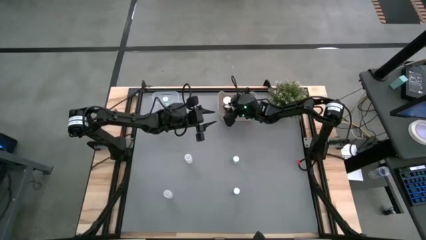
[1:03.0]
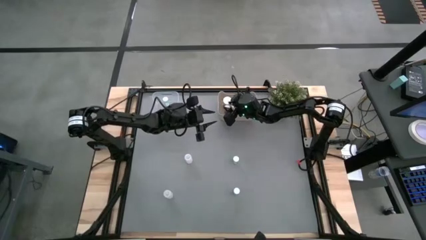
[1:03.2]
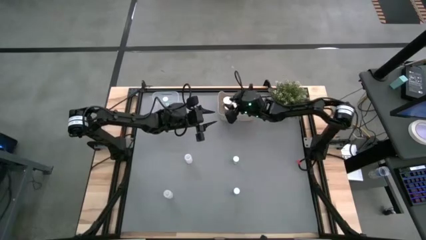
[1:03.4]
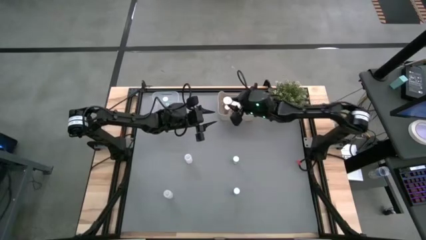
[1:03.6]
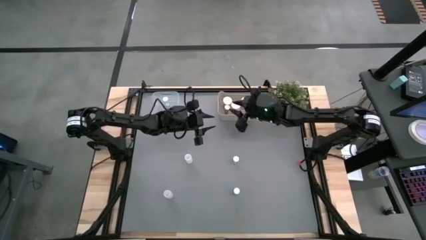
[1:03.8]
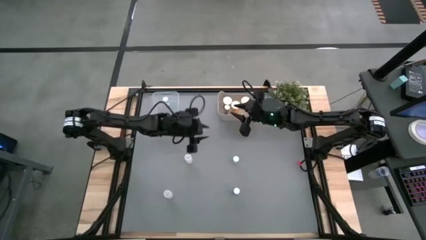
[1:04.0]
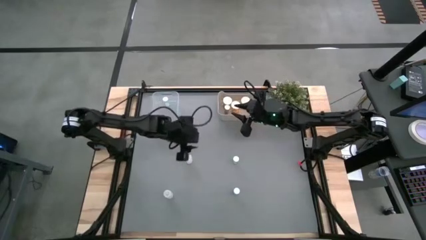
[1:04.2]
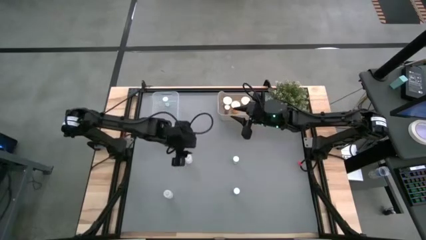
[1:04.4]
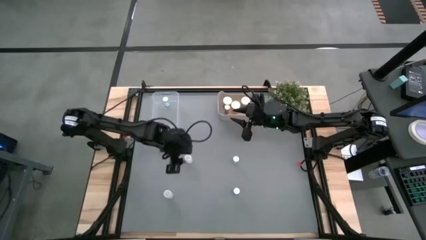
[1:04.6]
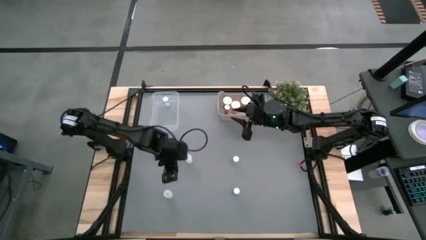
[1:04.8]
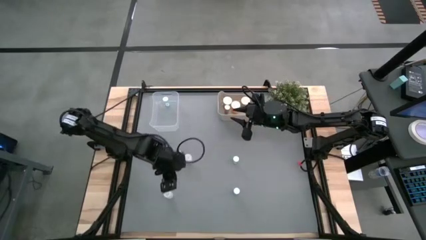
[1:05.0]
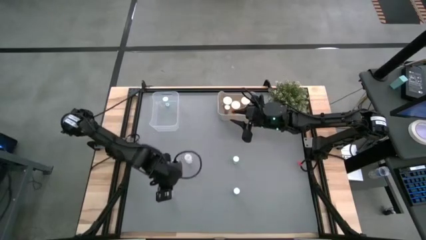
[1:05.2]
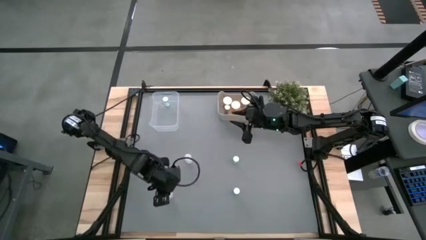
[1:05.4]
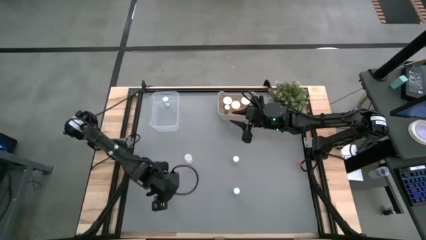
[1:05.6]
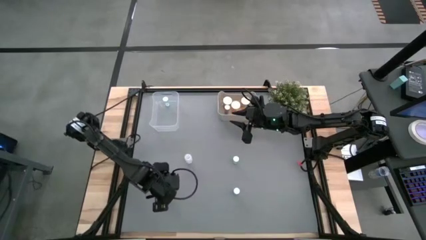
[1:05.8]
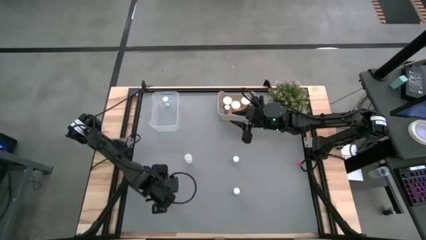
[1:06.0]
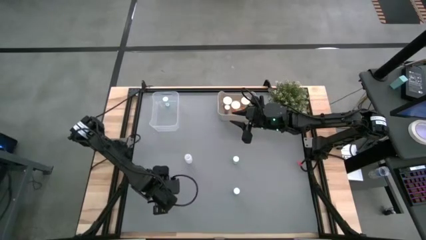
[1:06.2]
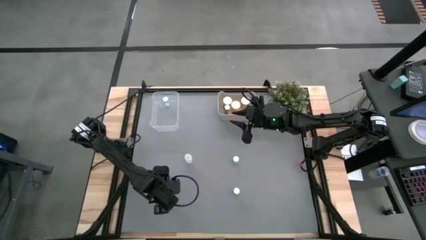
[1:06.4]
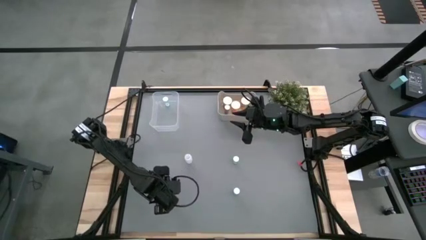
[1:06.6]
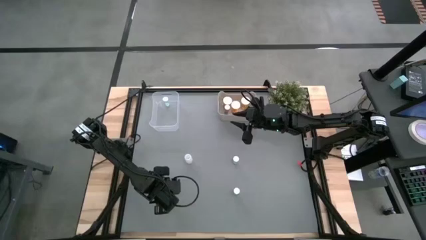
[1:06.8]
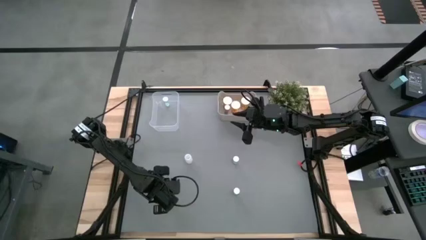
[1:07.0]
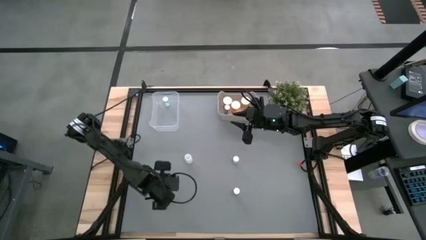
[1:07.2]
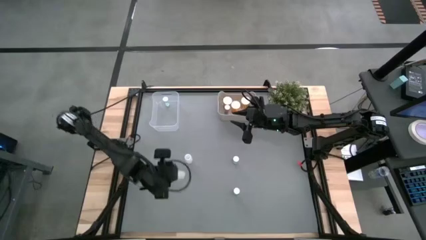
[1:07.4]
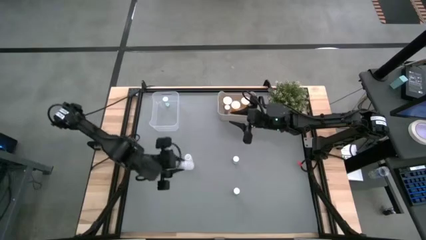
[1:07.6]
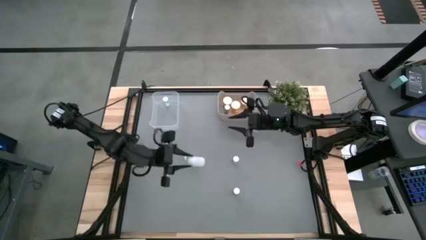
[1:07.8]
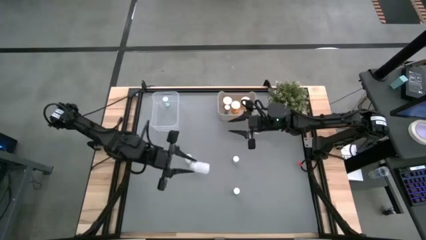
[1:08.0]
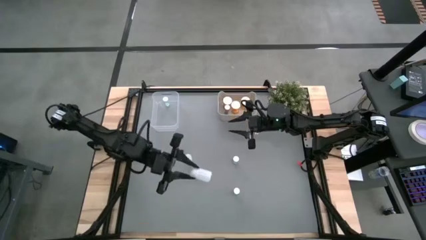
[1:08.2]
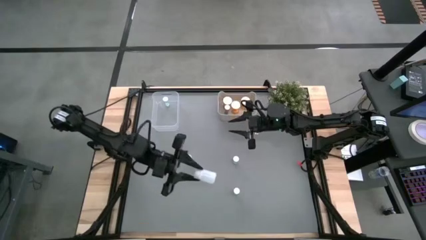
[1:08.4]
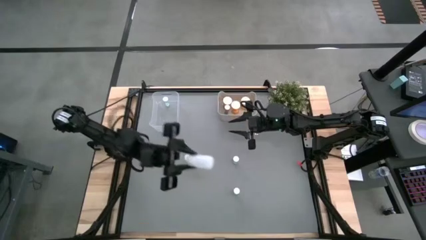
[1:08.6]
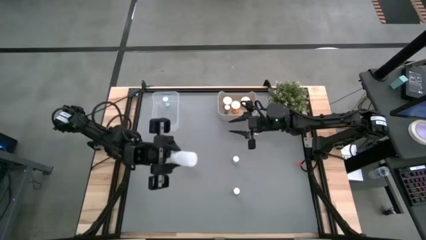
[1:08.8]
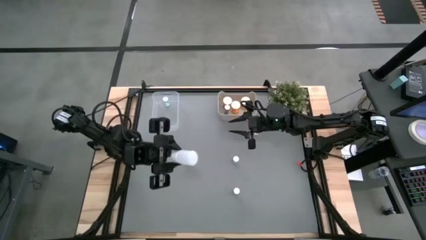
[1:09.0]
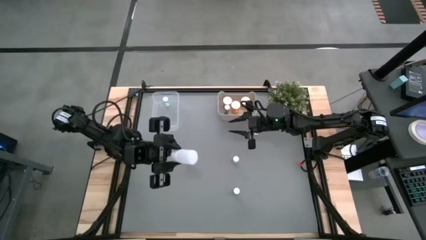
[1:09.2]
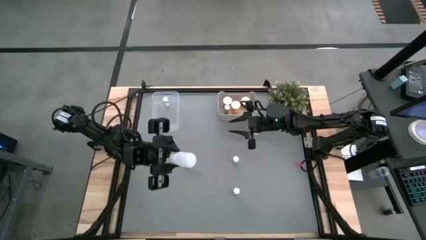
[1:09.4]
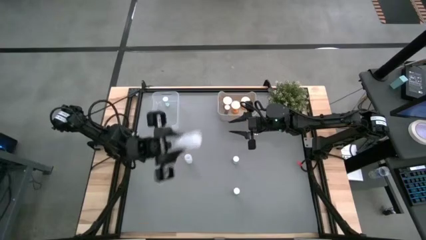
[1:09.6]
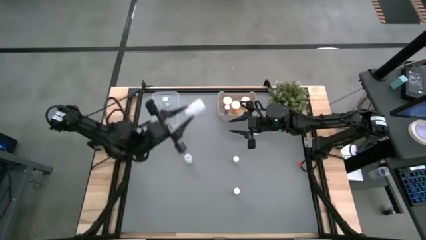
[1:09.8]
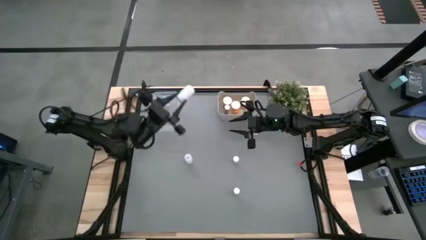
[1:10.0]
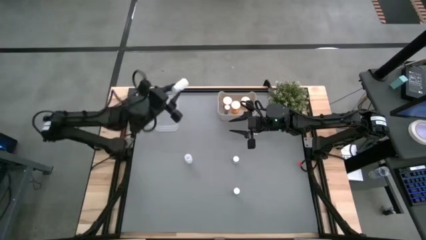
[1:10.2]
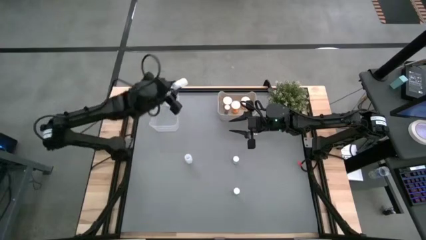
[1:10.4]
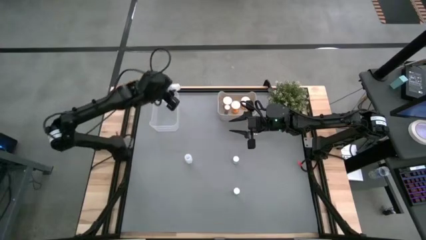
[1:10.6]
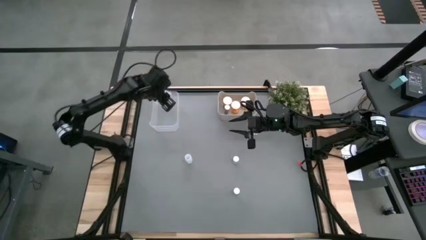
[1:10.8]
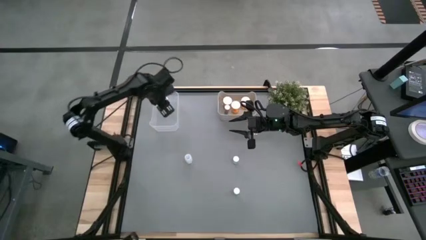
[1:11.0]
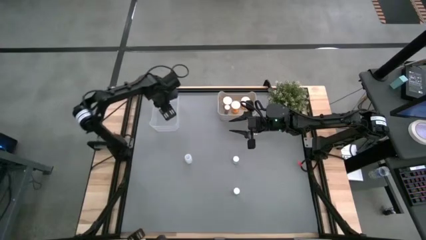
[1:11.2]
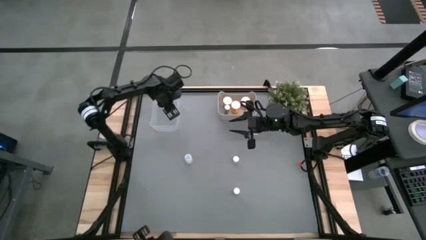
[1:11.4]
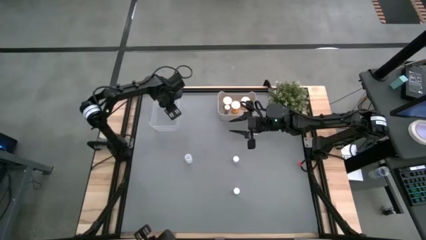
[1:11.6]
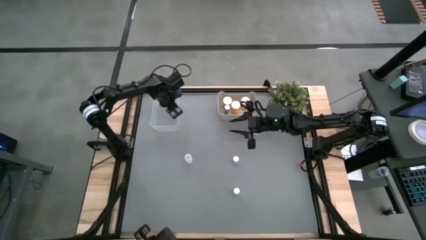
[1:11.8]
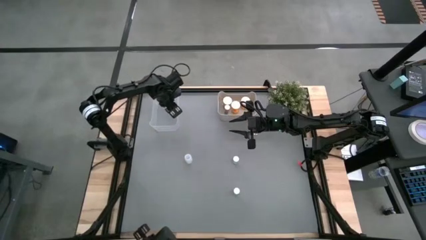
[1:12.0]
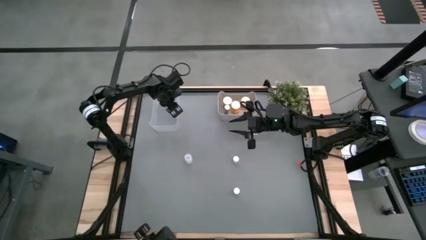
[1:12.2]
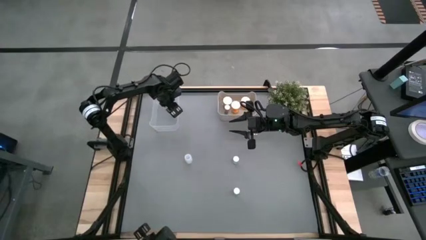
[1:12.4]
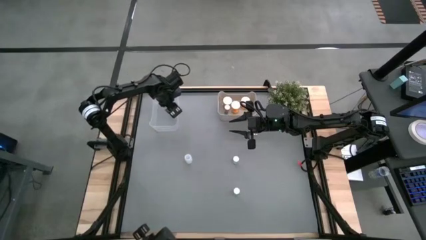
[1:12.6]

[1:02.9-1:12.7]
Task: Pick and place medicine bottles into bin by pill shape (circle, oval)
Put the bottom white tablet bottle into the transparent bin

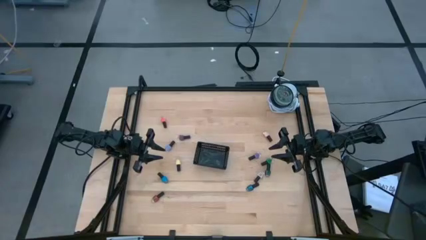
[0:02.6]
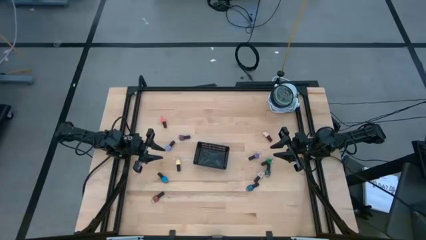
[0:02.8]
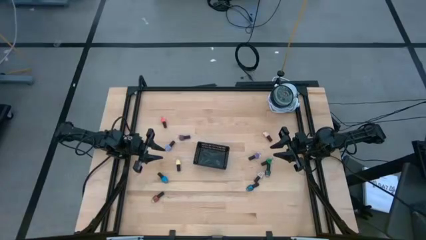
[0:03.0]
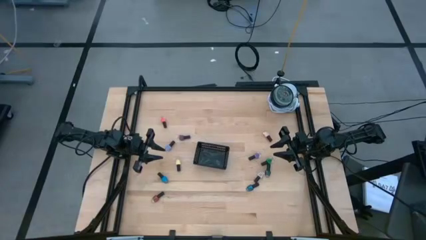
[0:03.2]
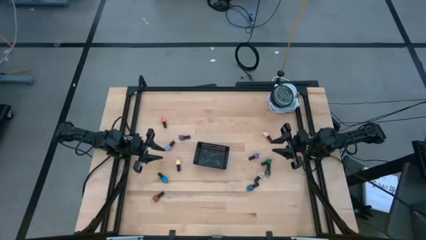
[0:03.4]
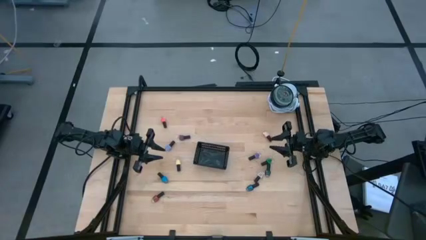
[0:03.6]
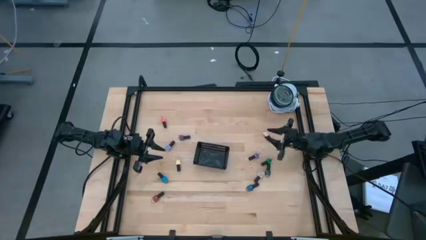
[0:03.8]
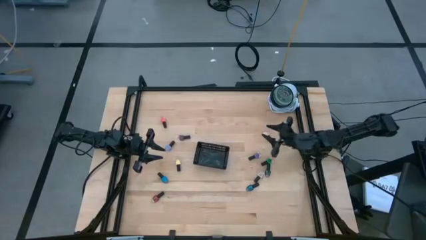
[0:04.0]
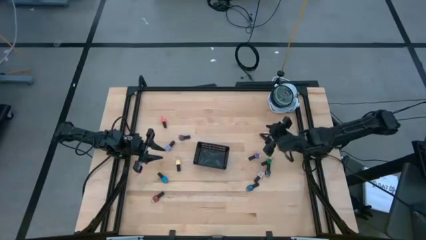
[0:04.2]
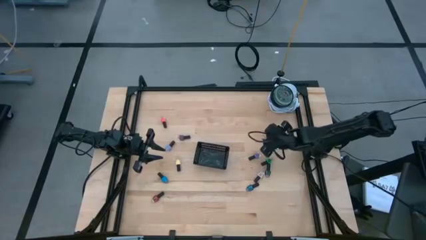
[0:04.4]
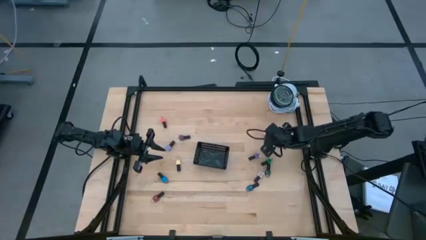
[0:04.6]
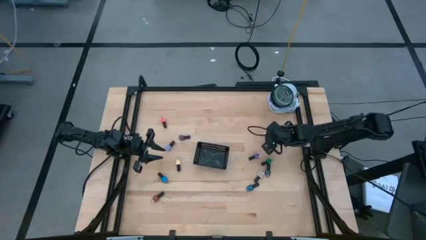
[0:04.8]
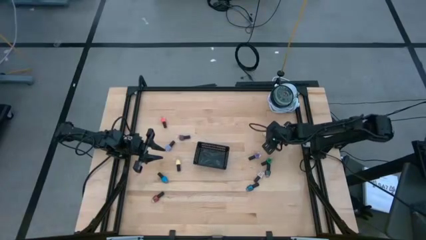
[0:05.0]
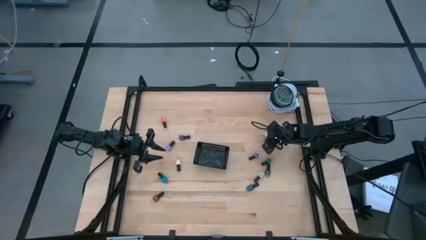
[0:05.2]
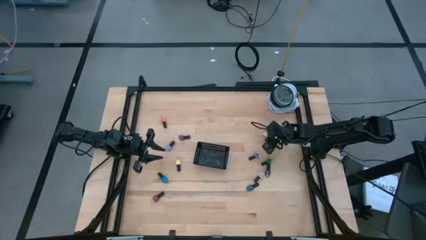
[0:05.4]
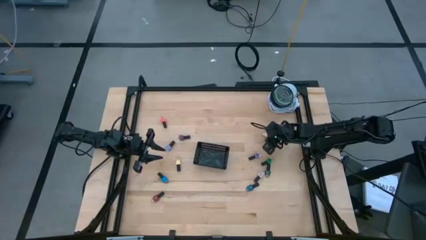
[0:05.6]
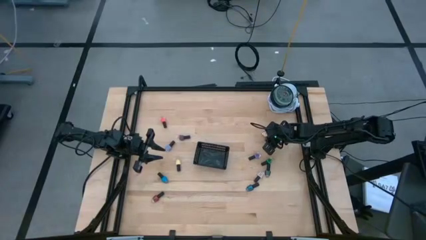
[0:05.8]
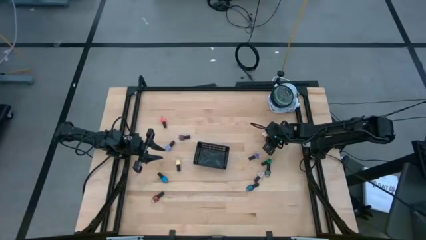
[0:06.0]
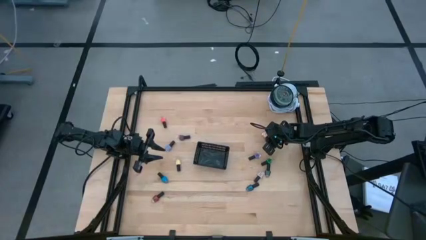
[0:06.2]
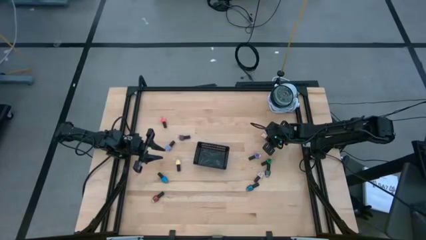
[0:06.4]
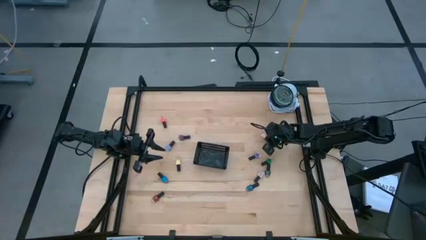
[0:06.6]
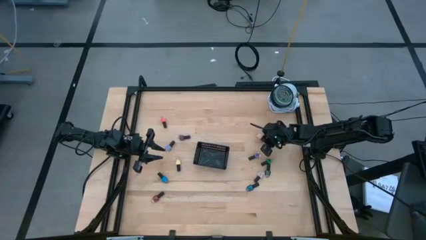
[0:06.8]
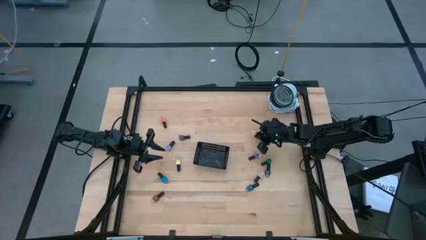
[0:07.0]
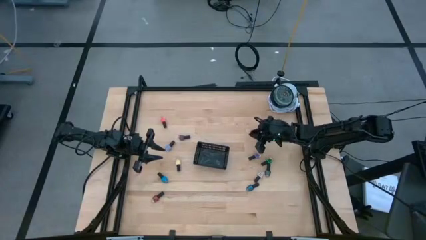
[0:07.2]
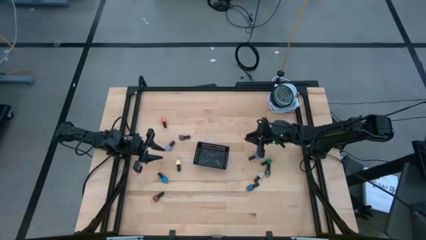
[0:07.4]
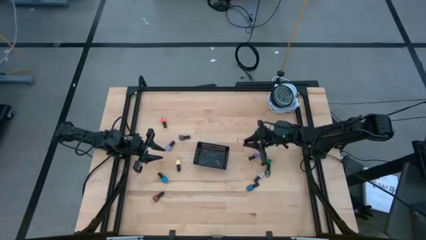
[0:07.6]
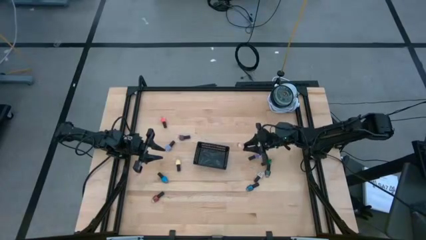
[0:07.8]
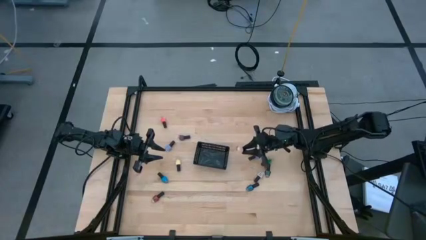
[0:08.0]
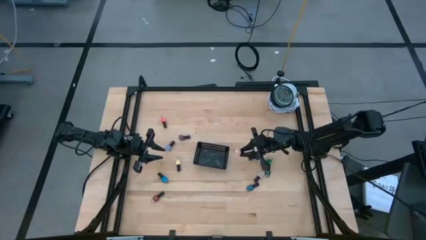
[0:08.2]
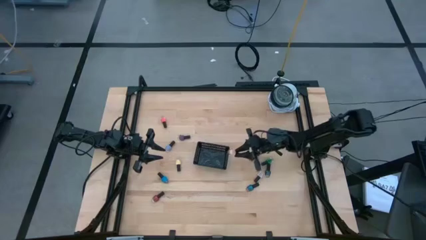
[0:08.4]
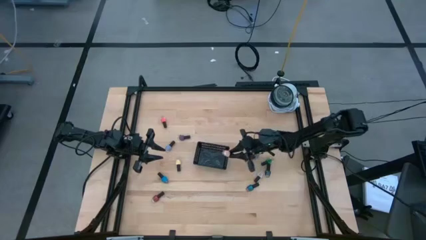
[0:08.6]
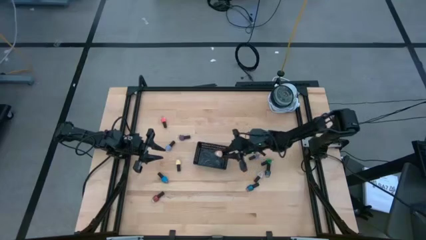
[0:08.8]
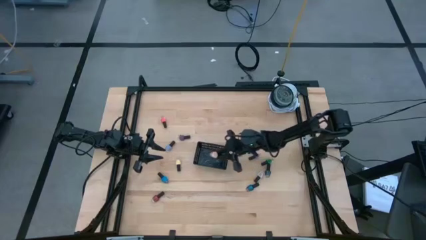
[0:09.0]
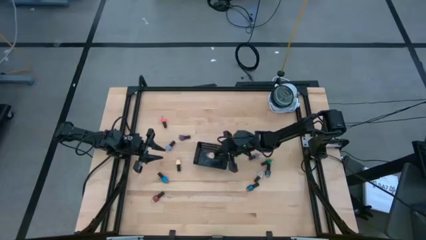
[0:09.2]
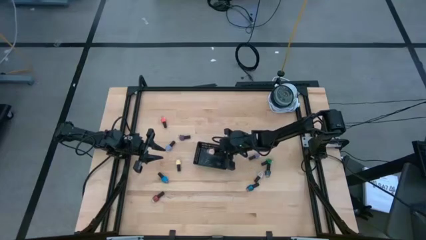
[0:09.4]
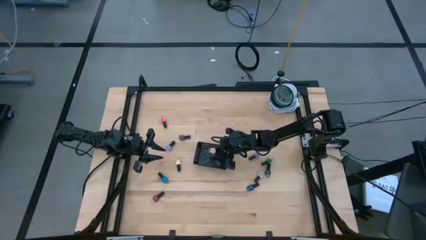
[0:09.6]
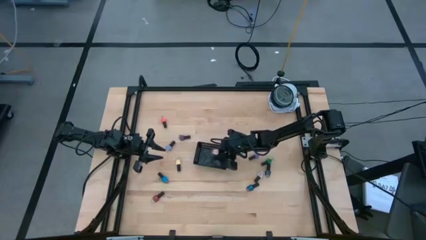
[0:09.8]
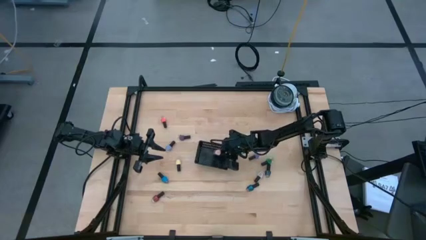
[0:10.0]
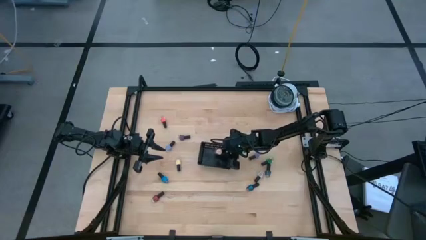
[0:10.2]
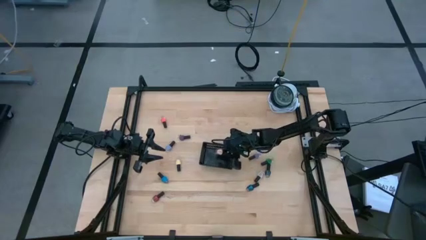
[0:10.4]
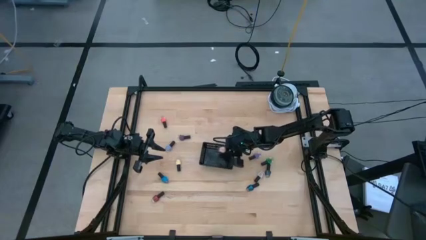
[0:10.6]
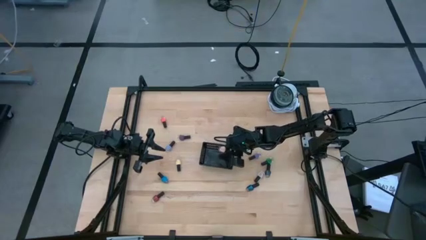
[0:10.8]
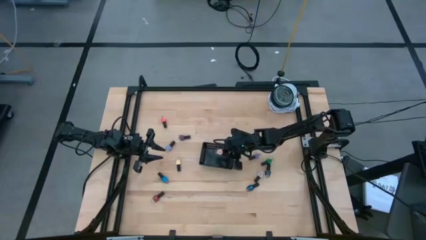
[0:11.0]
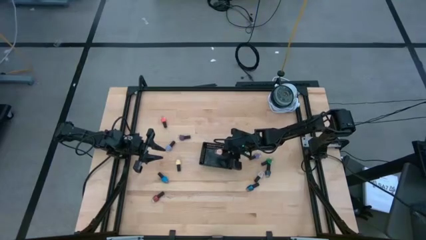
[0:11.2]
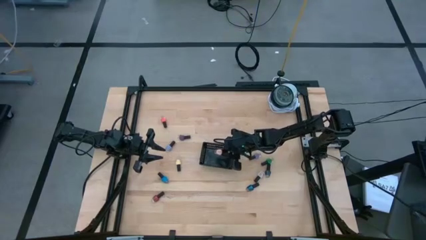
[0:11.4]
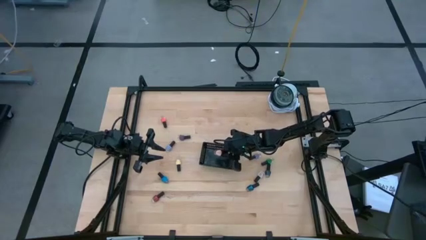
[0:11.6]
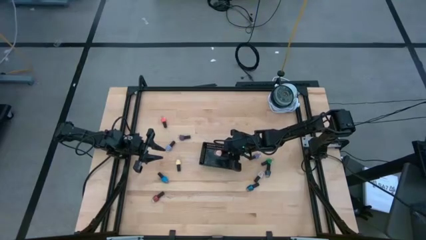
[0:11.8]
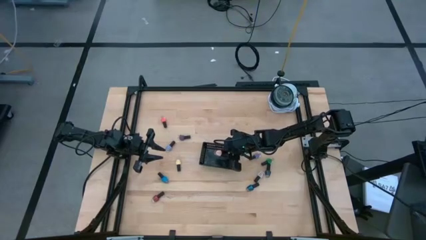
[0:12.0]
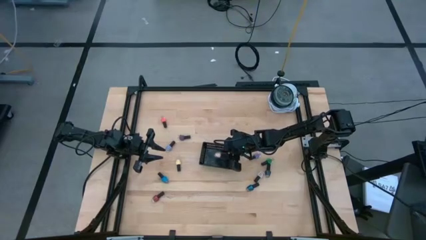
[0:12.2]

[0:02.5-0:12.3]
Task: Pick & Place Nail Polish
Put the light pink nail polish into the black bin
